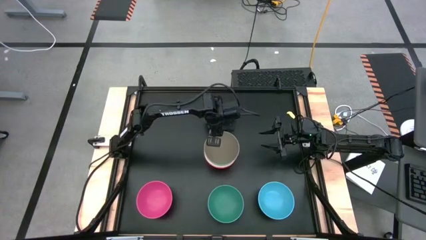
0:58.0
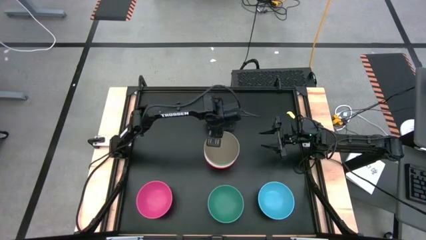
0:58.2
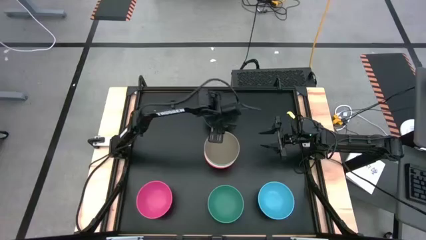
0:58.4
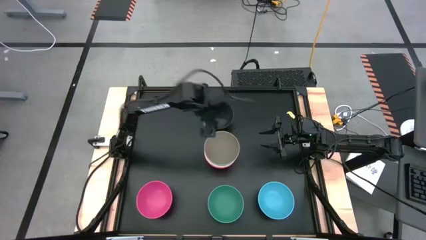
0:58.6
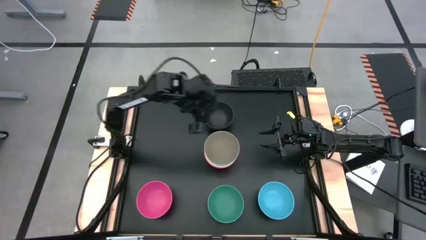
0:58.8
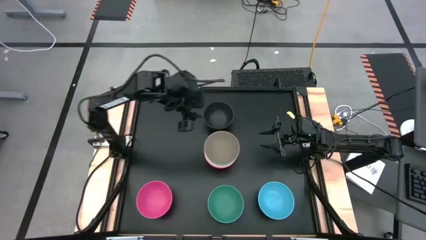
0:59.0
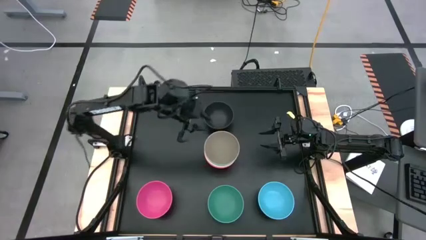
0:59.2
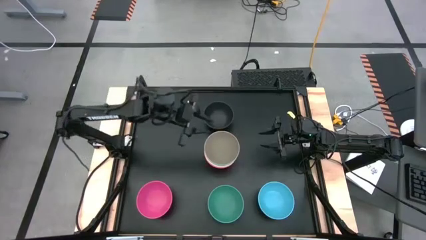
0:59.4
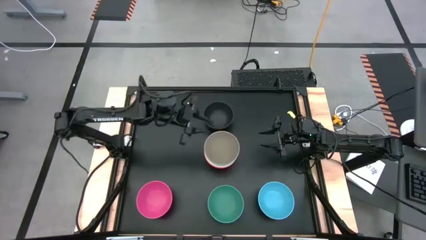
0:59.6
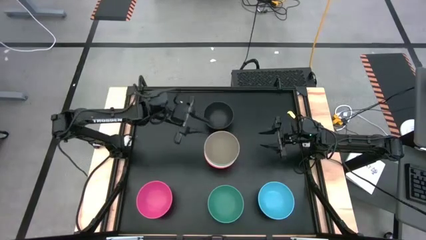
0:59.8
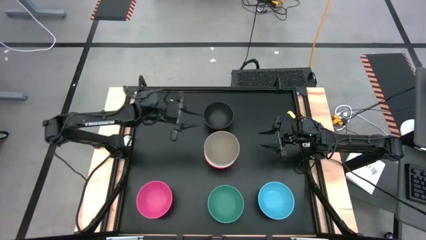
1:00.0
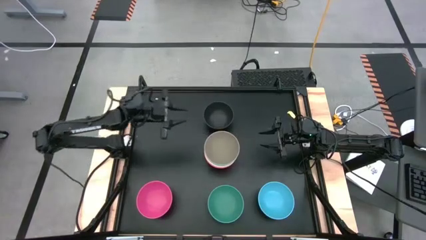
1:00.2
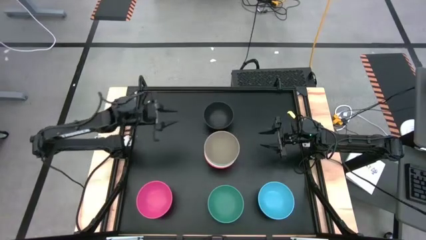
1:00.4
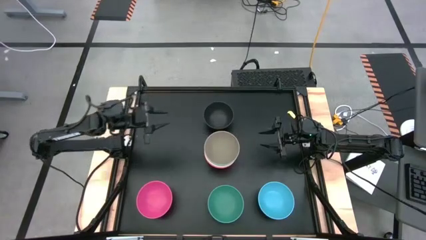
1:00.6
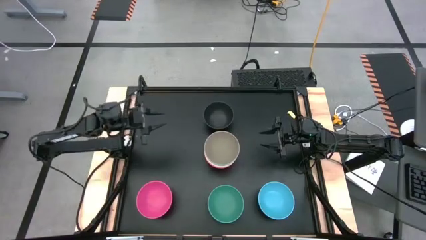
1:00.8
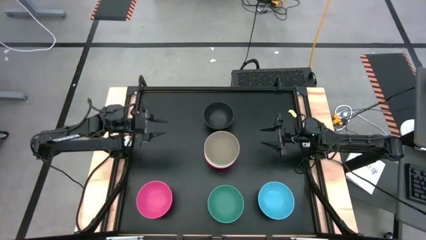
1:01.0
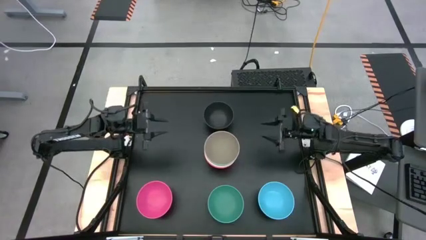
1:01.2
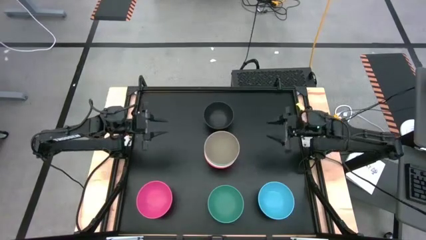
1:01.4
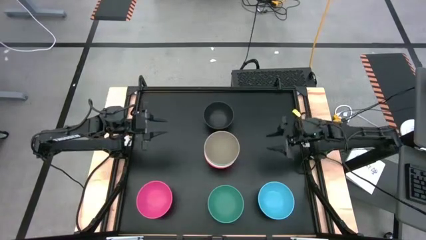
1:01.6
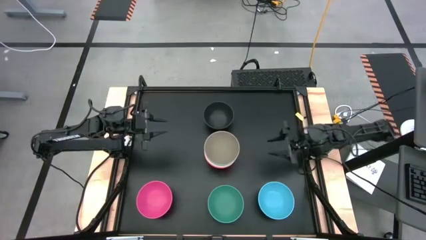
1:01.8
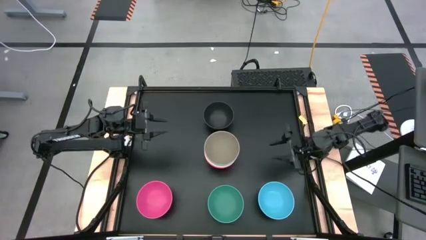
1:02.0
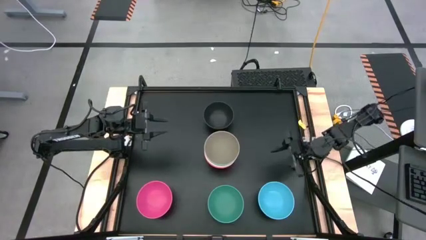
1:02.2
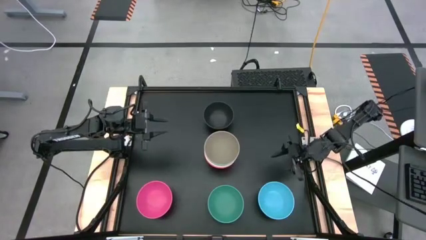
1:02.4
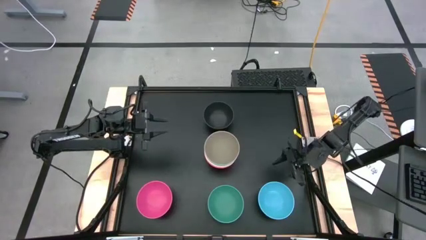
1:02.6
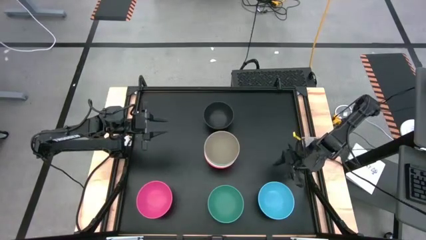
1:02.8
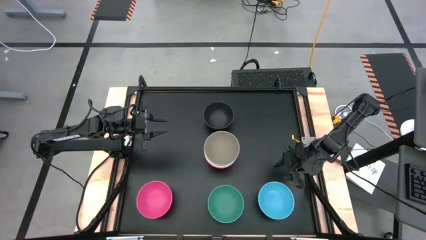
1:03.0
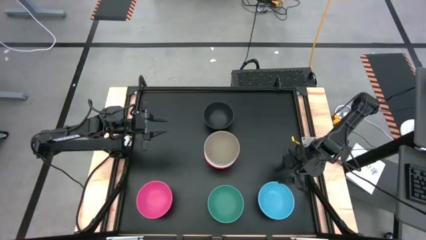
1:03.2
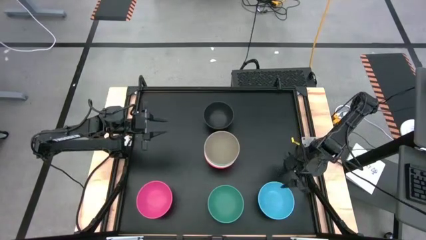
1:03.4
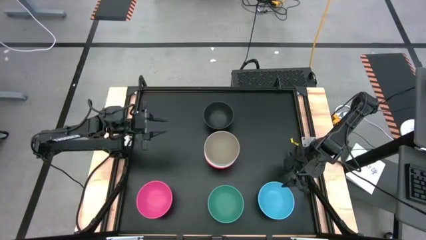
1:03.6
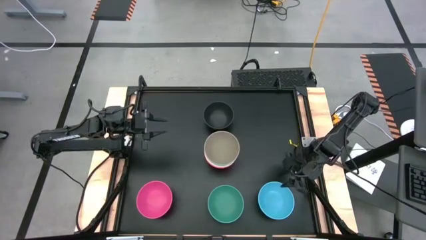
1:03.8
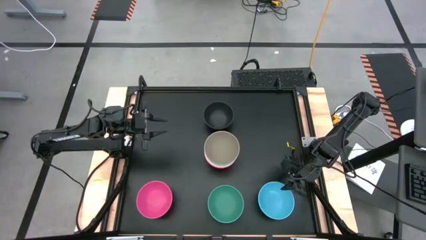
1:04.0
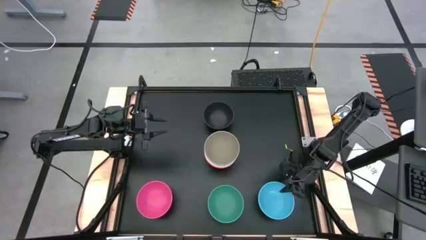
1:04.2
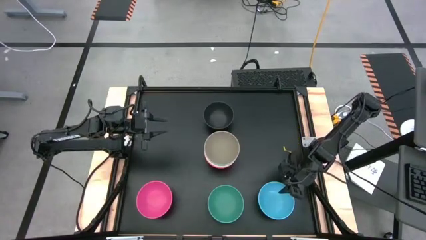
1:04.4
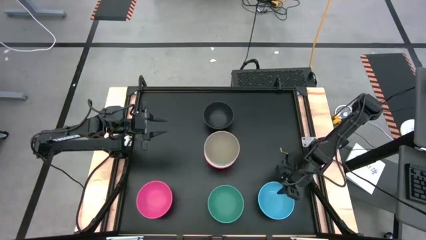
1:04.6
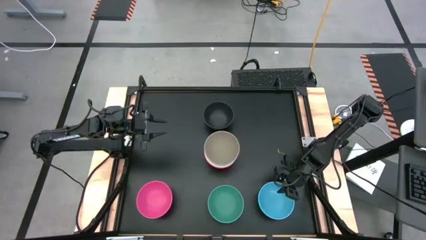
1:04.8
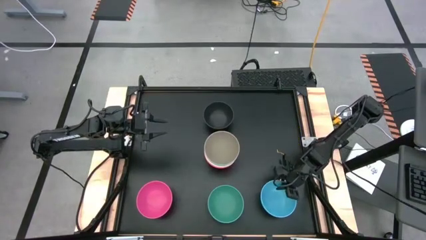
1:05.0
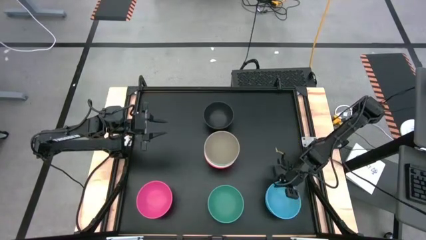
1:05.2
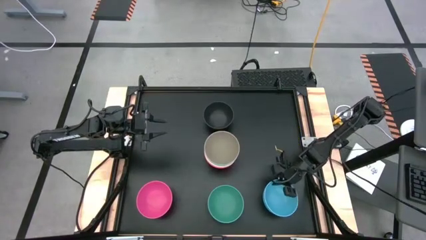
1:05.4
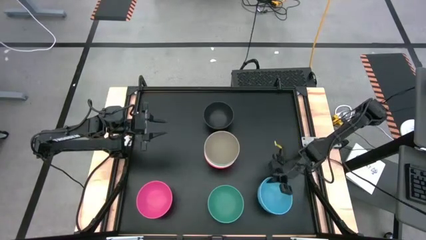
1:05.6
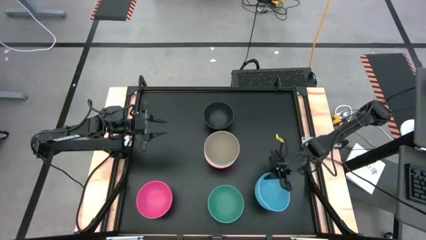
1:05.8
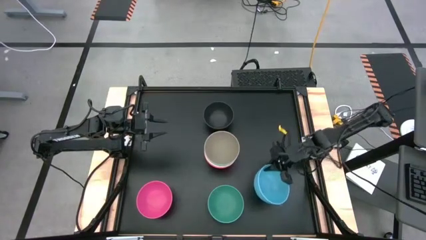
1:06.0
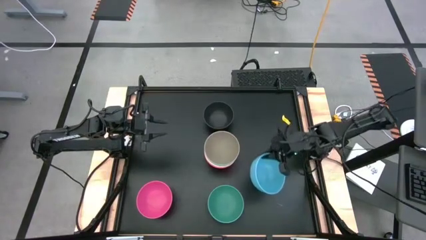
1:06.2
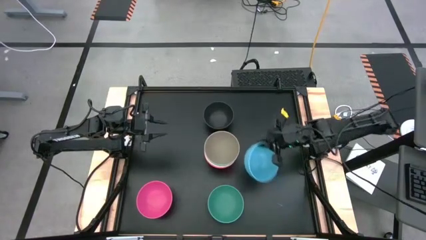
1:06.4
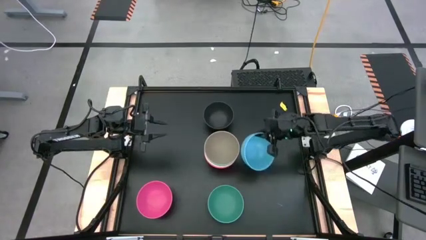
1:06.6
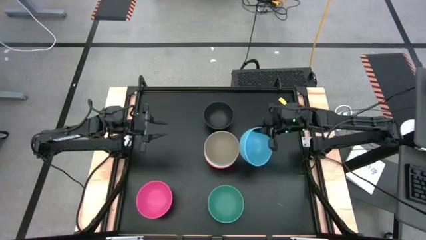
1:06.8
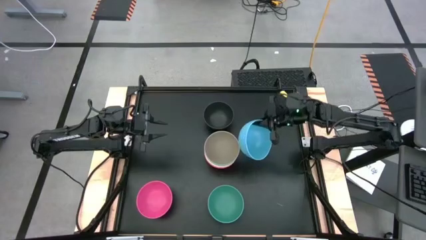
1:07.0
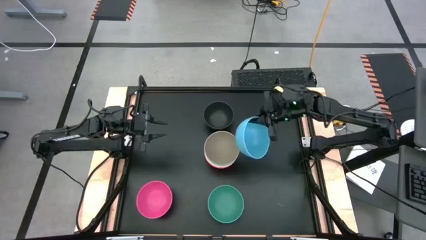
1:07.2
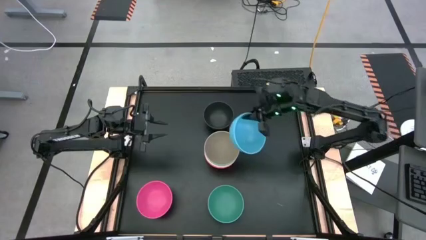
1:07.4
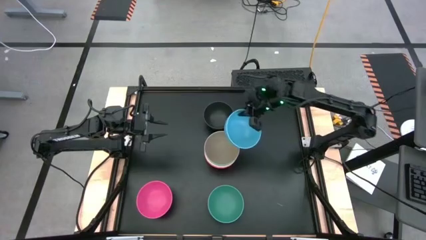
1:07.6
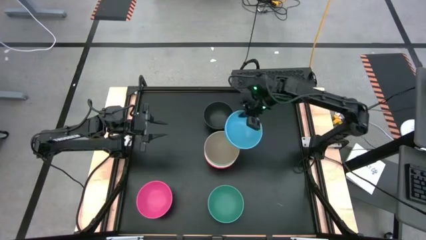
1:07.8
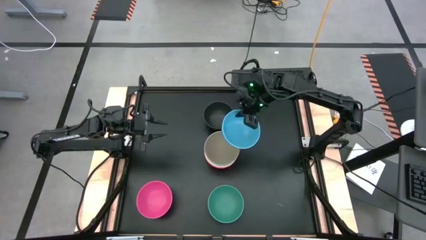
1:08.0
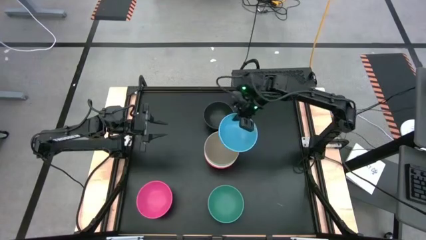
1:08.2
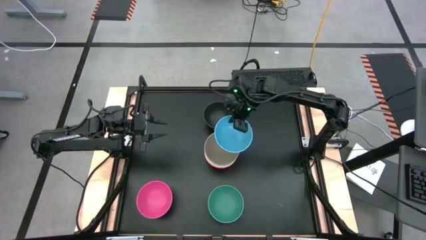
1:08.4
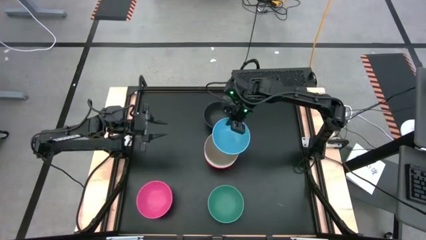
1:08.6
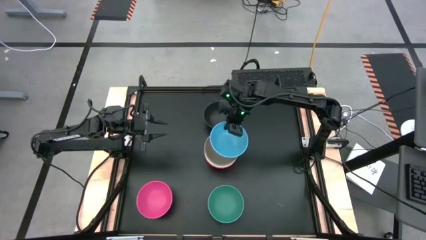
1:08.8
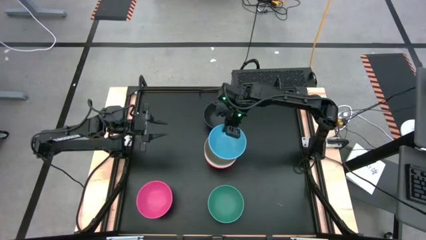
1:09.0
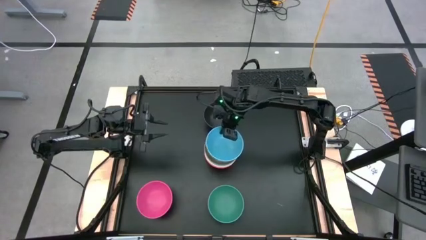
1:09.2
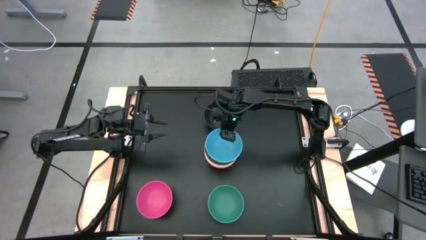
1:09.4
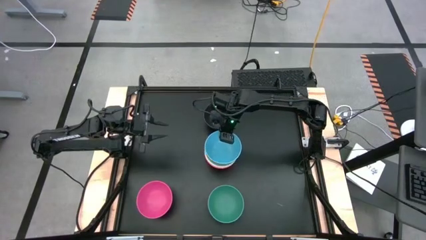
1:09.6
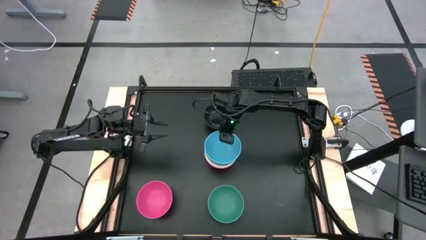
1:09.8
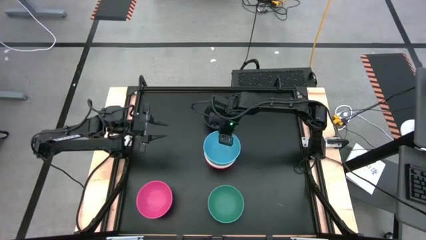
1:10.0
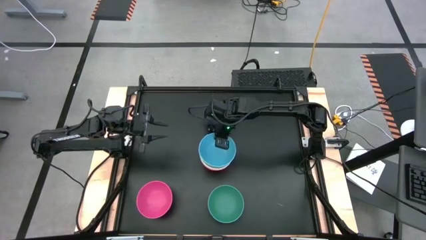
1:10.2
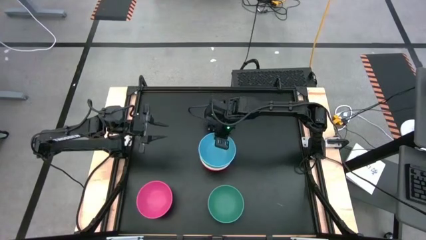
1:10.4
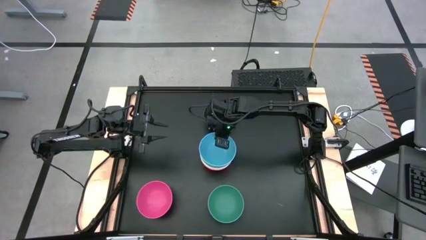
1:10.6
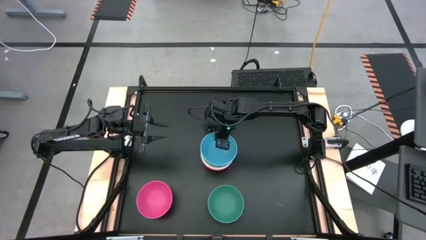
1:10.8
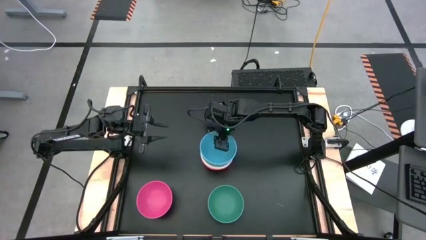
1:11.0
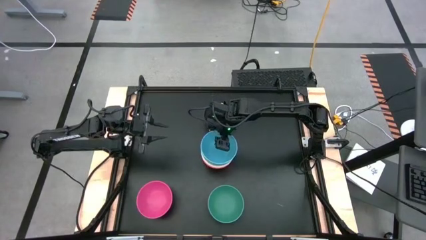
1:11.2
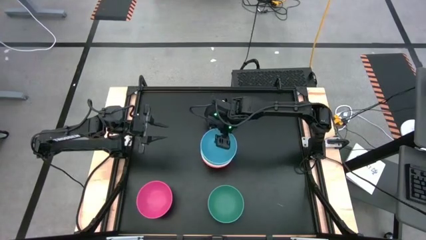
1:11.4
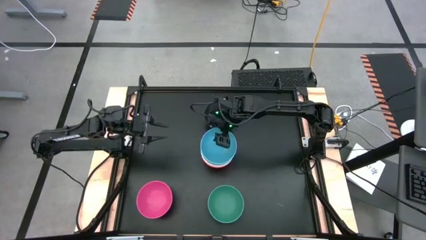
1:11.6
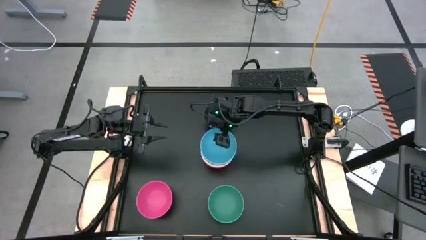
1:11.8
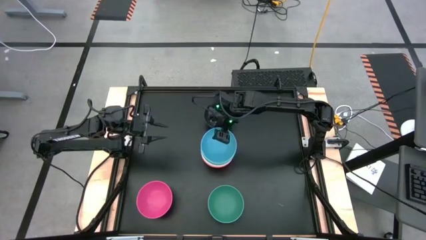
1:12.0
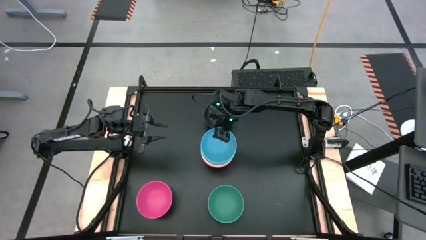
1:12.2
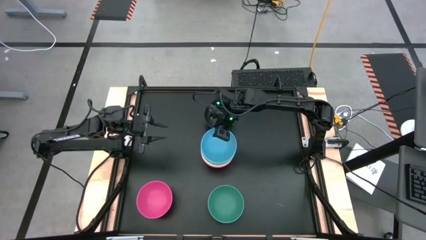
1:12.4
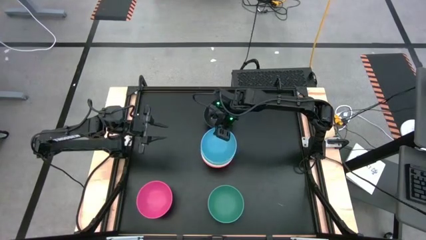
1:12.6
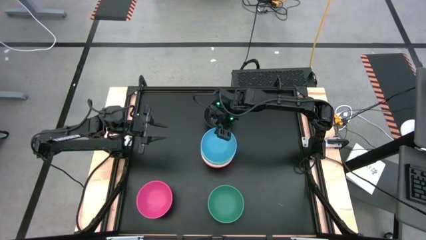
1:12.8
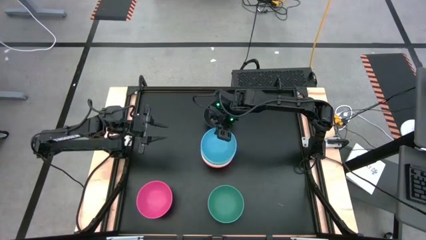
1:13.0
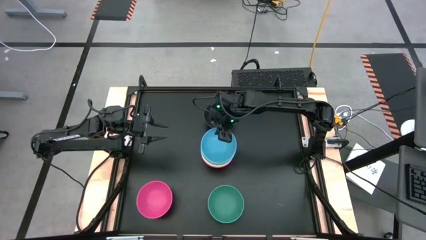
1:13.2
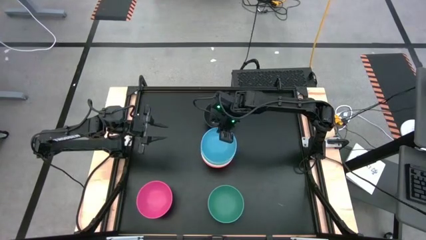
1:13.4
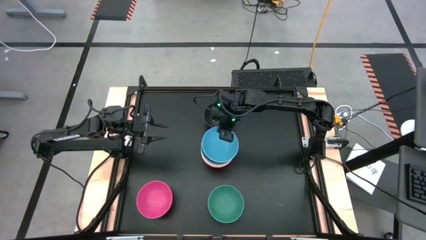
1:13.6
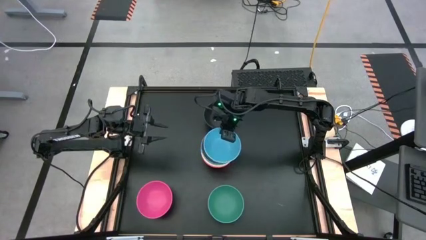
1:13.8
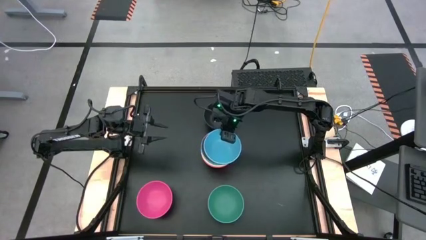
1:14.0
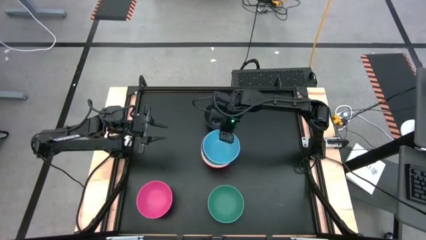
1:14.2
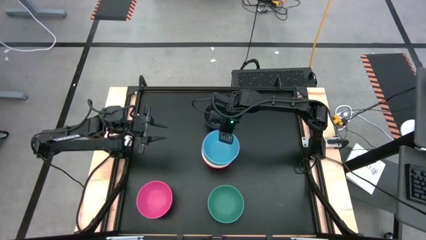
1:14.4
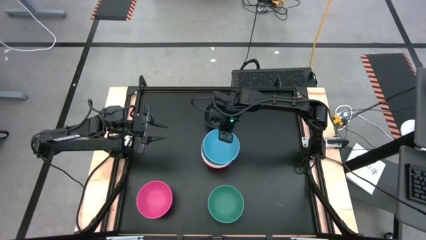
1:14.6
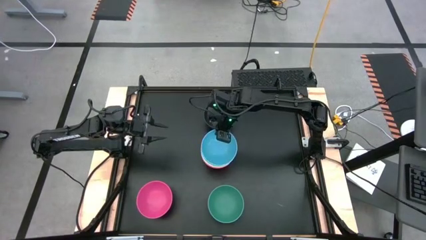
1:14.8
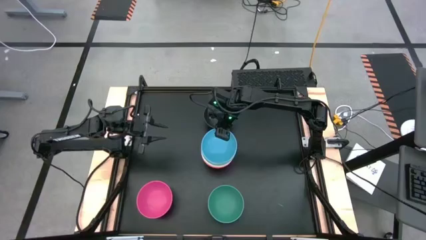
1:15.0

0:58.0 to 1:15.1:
Task: Nest bowls inside each other
Stack the blue bowl on the gray bowl

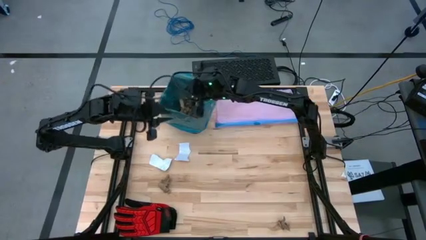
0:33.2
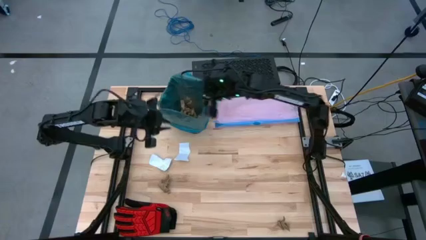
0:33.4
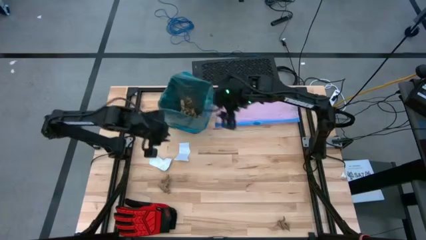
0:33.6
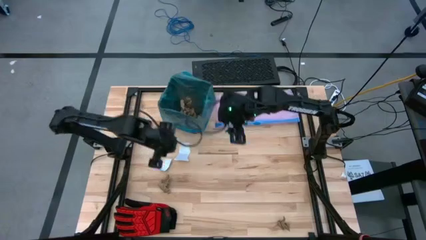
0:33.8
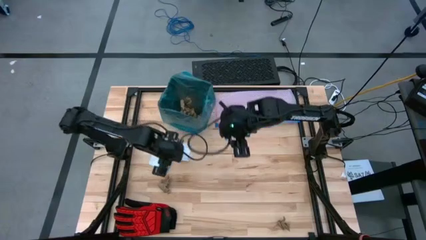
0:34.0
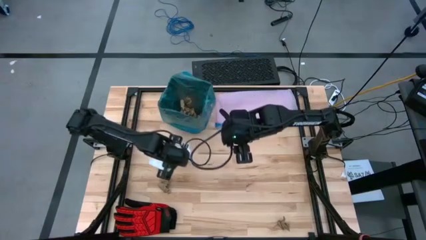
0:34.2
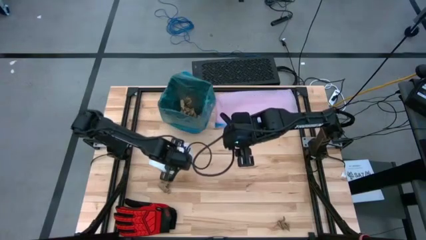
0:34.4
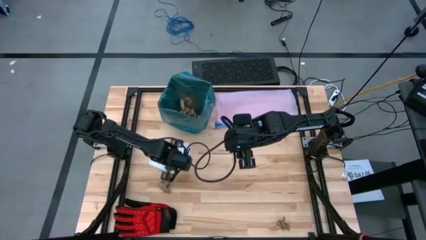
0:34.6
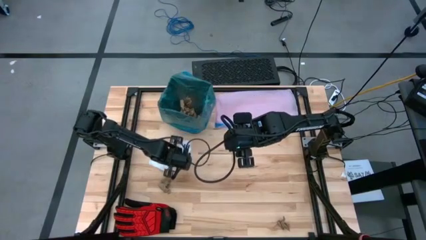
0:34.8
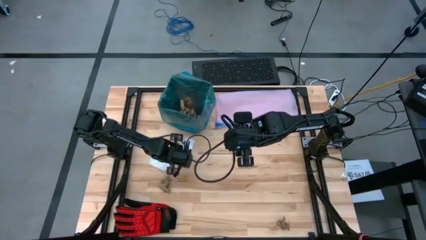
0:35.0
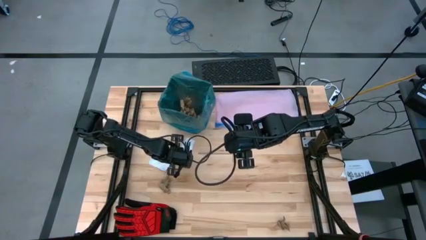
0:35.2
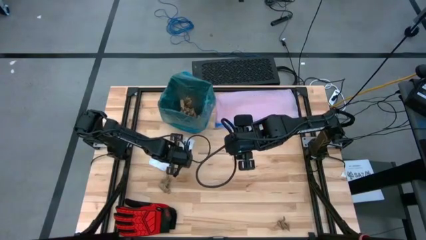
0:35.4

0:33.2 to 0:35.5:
Task: place trash/remove bag and relplace
Put the white paper into the trash bin
